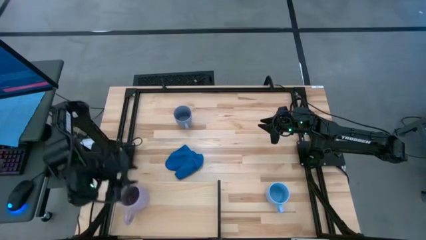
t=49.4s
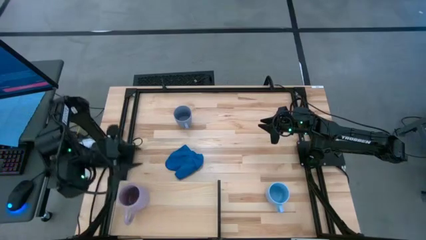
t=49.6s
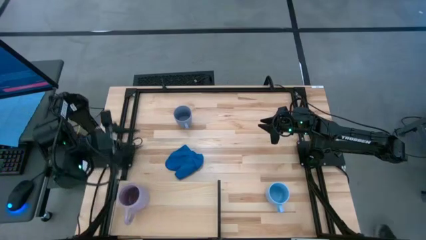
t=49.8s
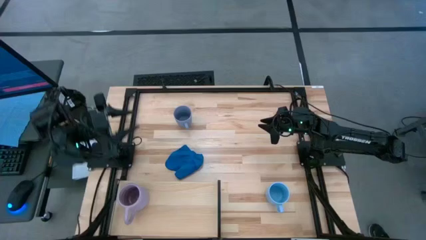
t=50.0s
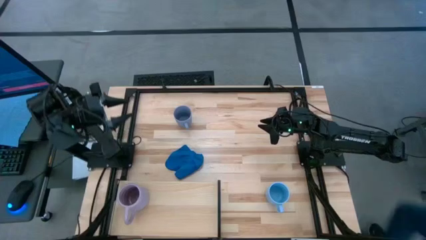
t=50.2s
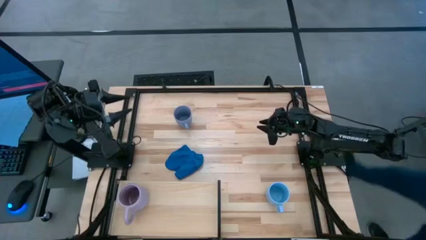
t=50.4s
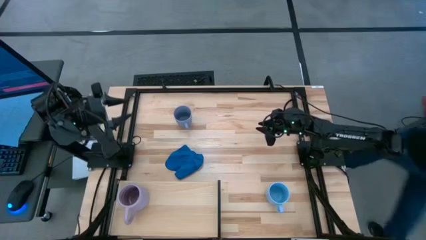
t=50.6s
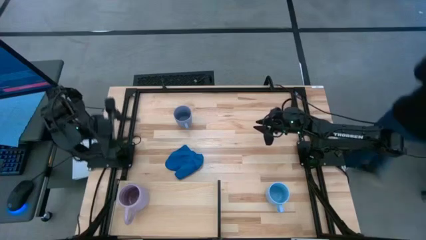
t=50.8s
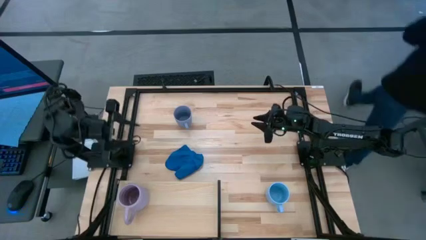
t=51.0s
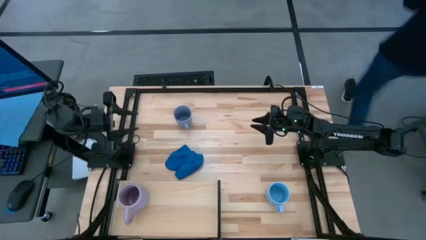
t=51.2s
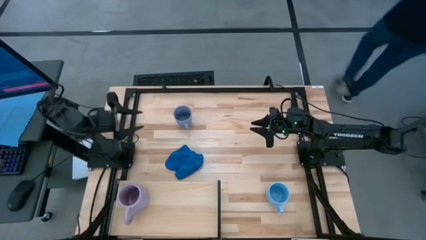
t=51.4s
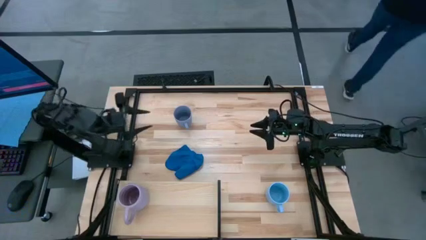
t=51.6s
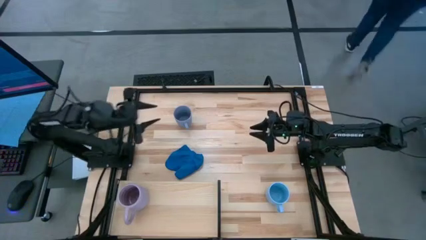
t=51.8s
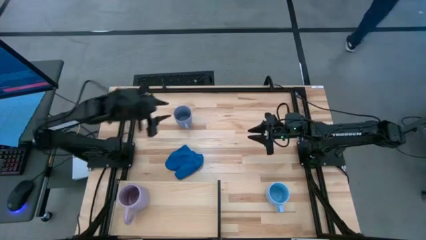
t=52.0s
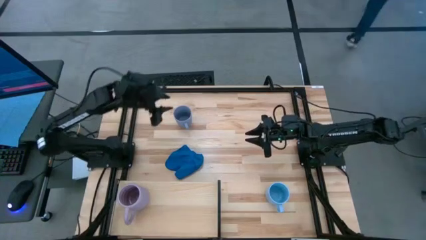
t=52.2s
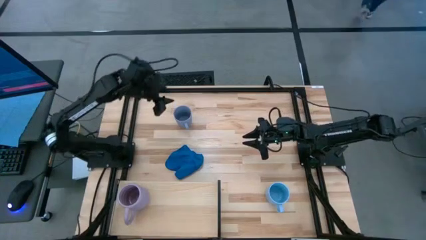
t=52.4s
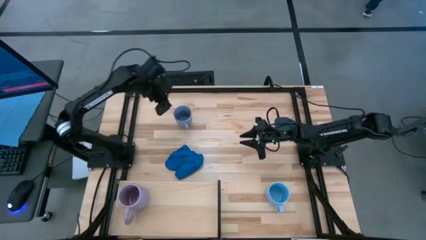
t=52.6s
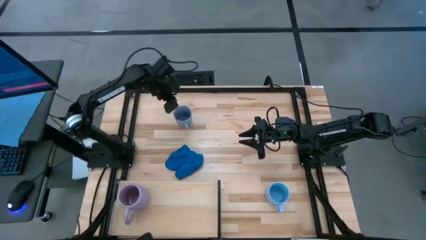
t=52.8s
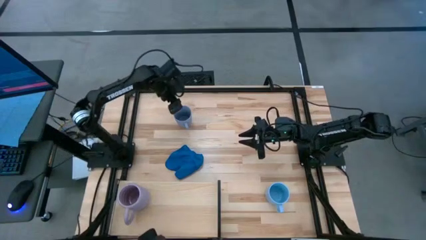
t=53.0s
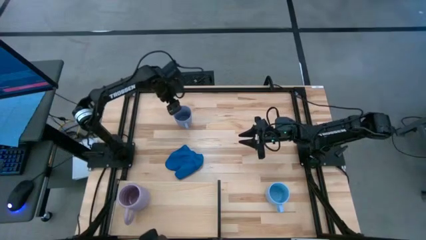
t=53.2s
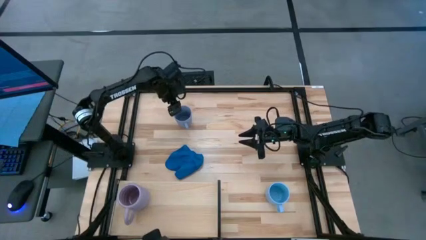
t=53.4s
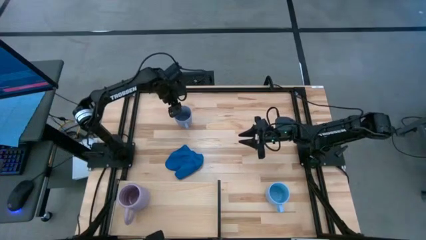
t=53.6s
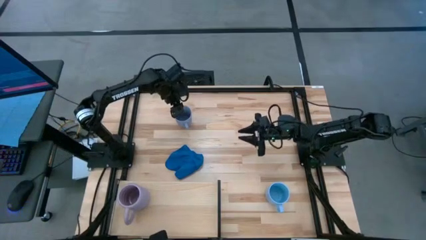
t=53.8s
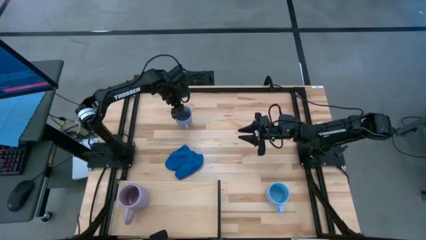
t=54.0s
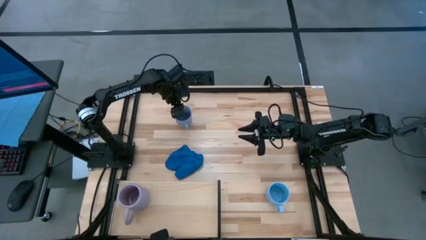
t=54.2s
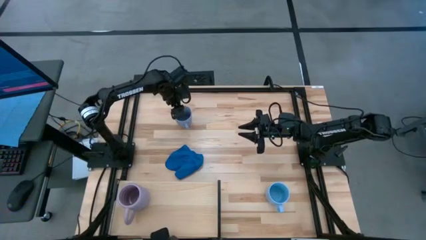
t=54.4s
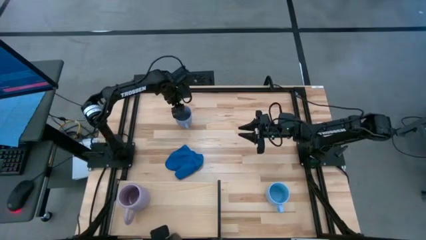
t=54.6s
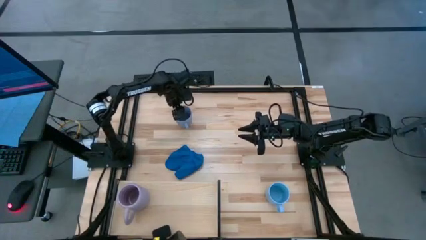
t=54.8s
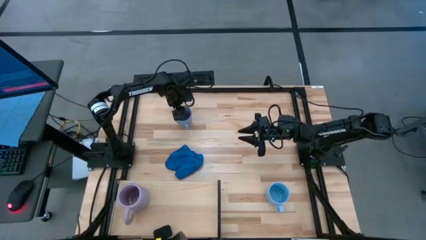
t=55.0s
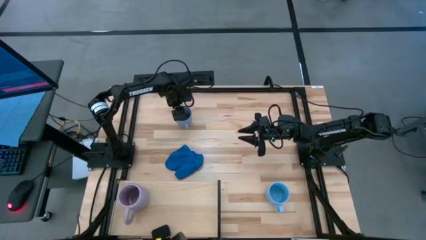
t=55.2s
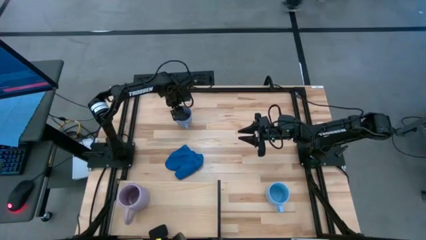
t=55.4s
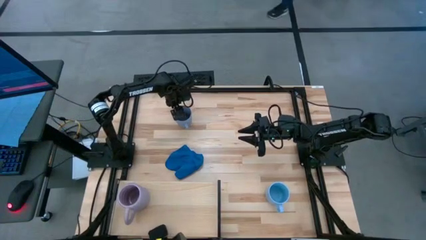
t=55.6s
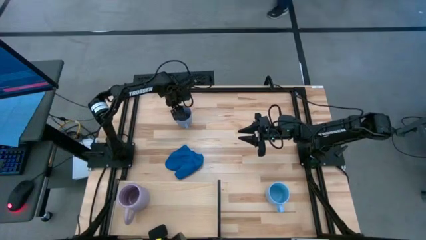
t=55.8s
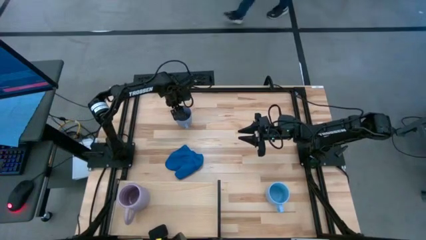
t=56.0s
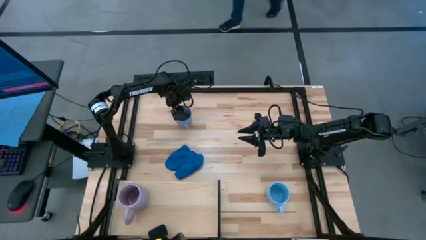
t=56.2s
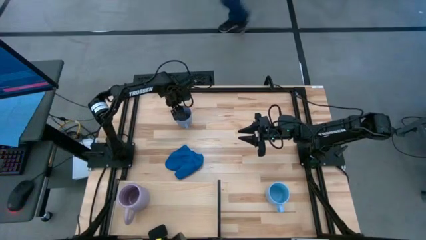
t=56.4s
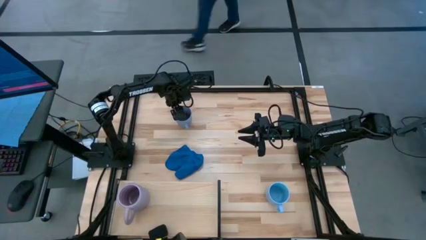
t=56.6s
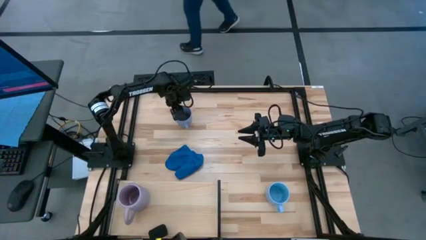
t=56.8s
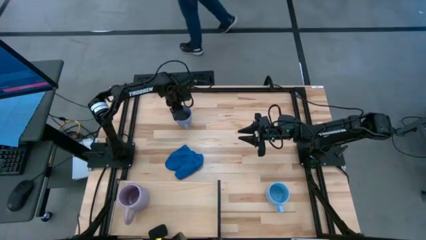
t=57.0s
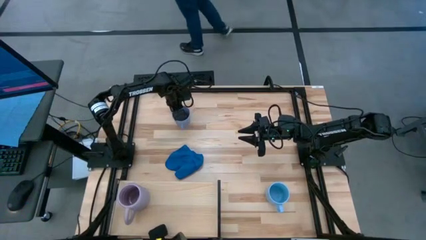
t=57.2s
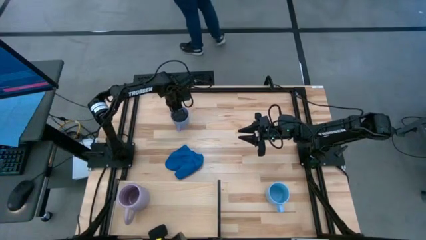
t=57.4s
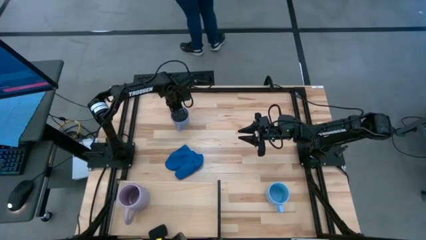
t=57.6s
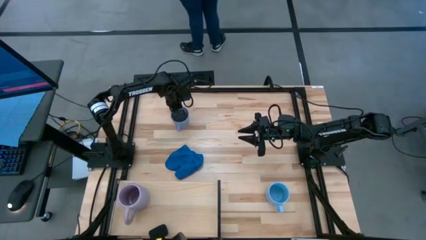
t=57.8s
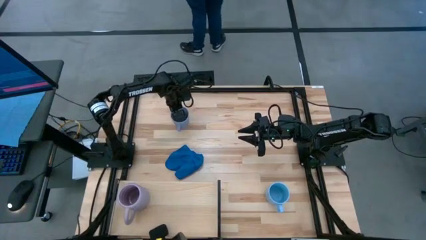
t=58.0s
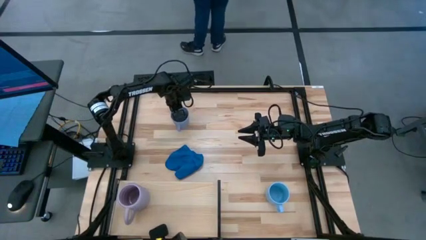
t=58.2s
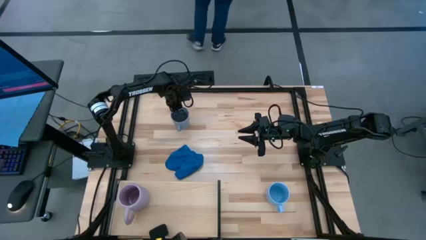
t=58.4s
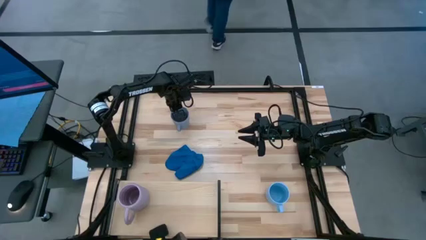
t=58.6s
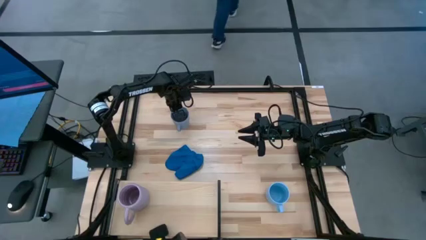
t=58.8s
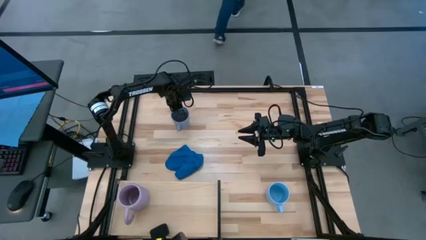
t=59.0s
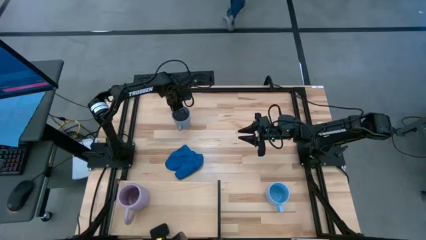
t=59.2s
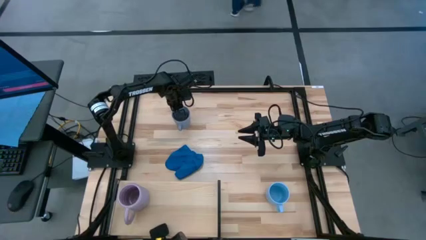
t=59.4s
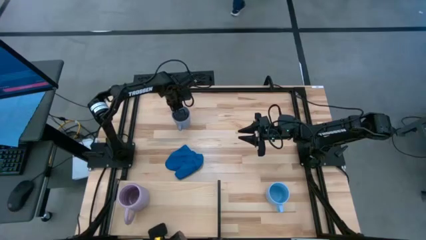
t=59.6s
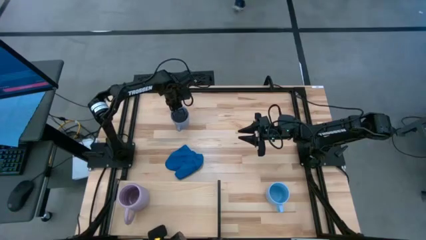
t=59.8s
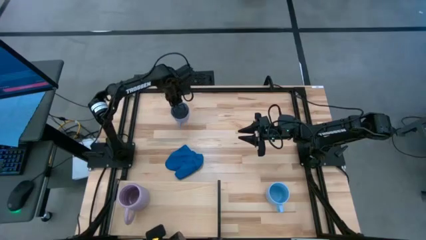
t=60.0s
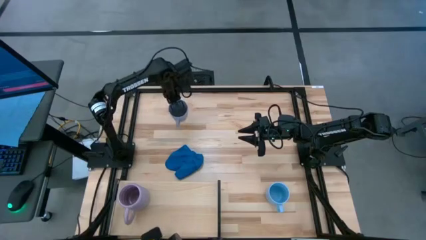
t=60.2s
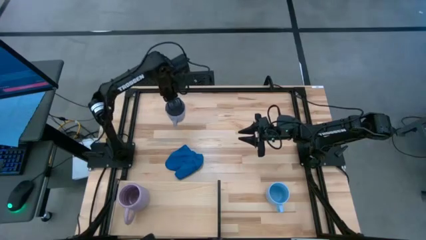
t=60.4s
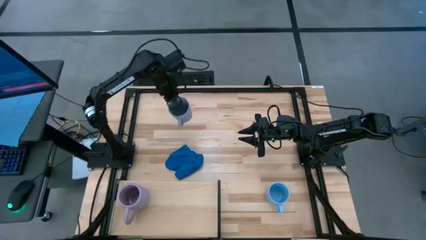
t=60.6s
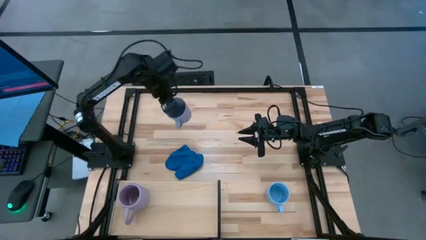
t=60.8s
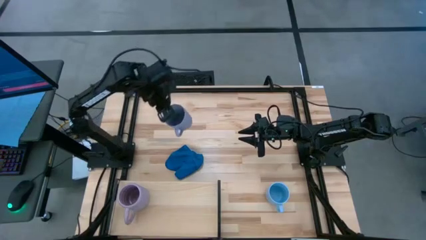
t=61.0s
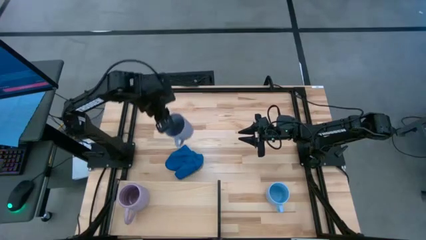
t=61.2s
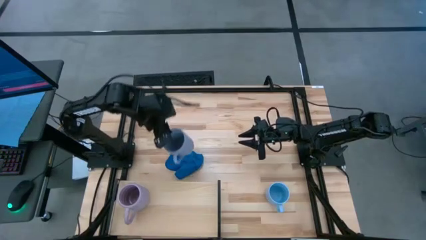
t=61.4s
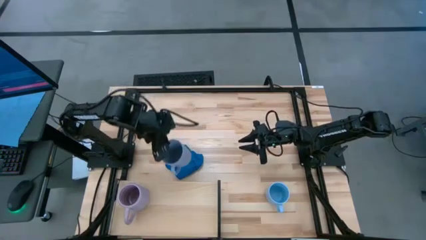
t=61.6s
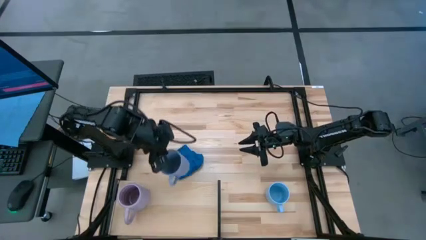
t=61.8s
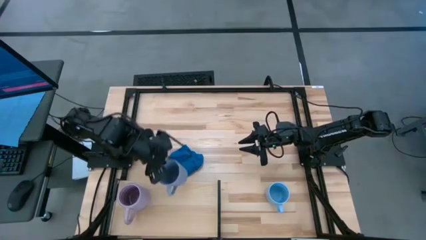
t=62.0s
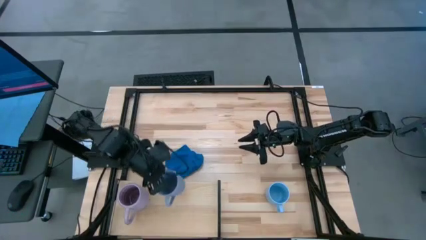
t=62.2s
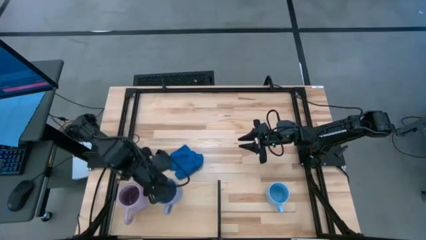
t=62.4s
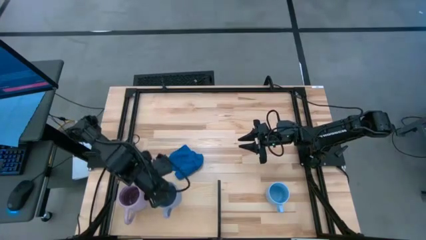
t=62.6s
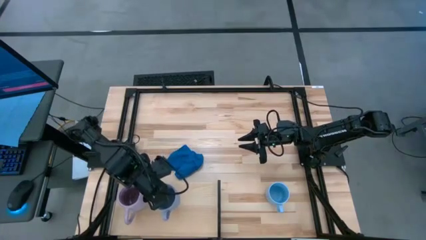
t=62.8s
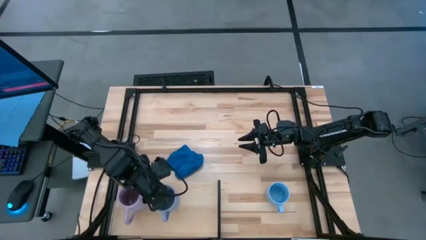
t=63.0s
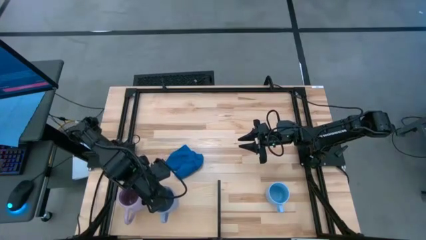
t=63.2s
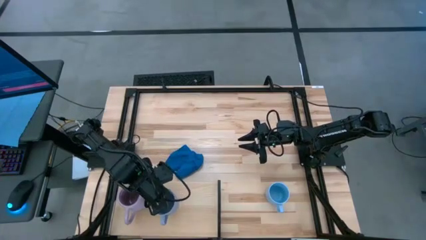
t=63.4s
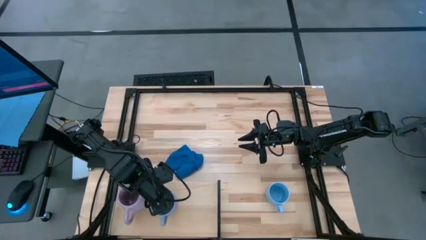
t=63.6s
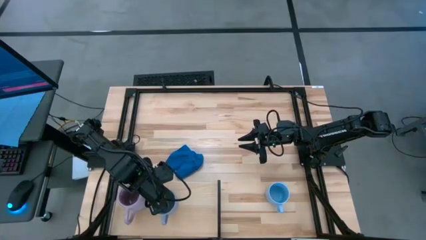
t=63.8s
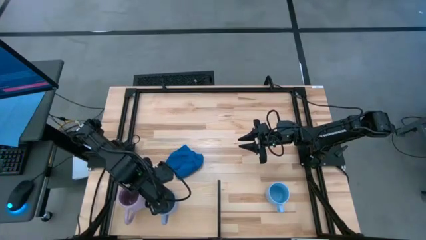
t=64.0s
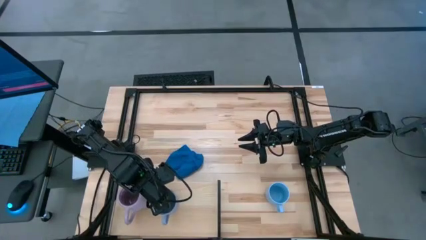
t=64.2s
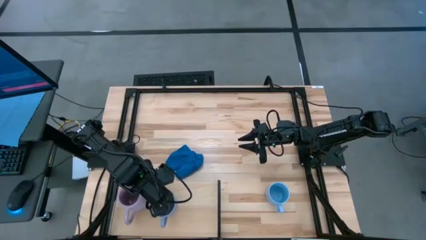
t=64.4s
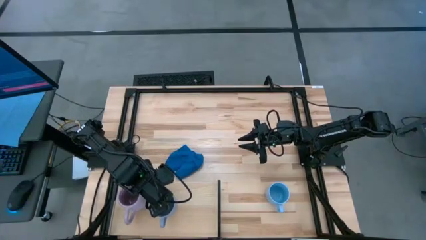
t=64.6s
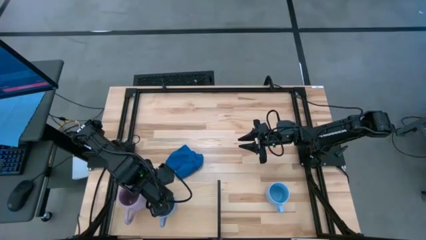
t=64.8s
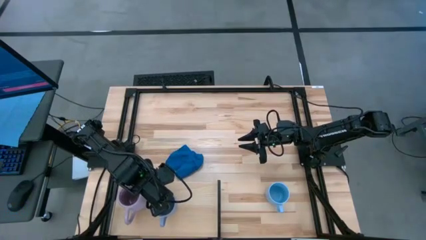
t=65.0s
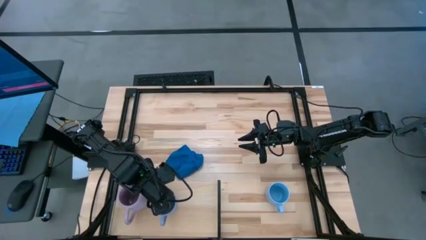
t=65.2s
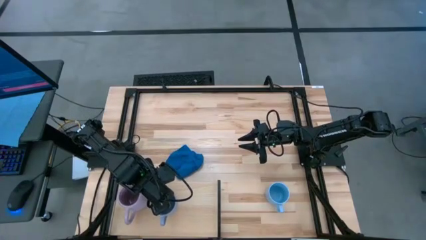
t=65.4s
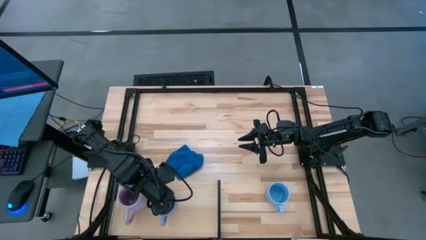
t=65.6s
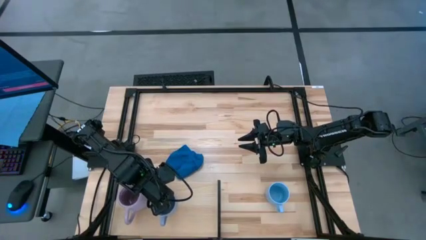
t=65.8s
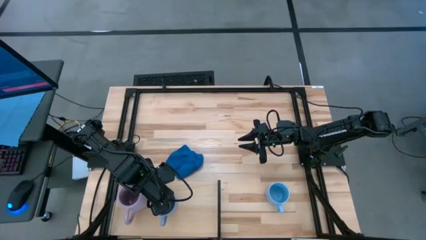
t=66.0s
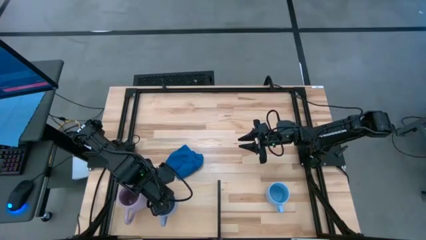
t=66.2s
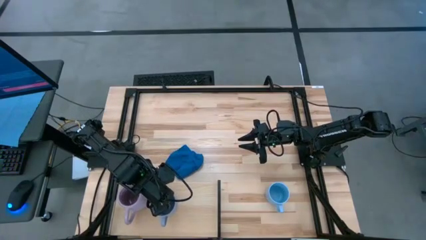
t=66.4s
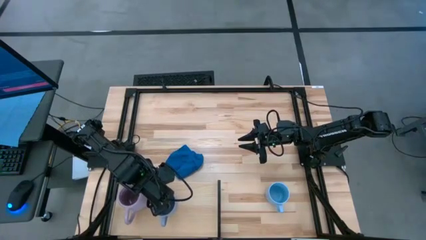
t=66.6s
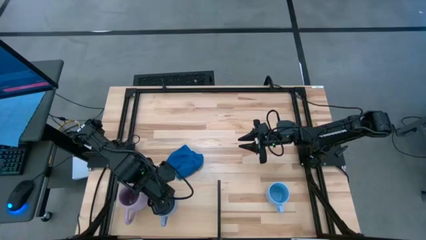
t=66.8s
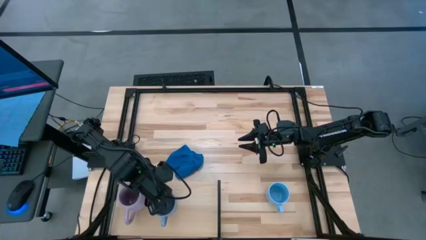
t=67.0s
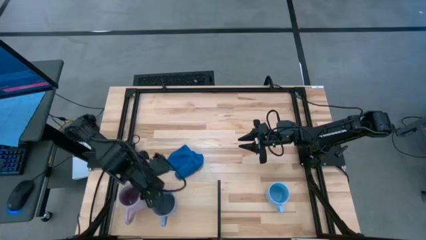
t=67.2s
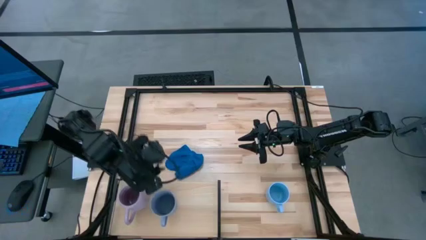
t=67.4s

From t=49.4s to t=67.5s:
Task: Stack small to large cups/mugs on shelf
Put the top blue cup on the shelf
